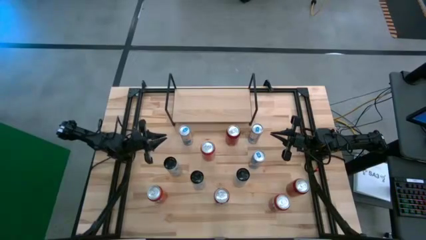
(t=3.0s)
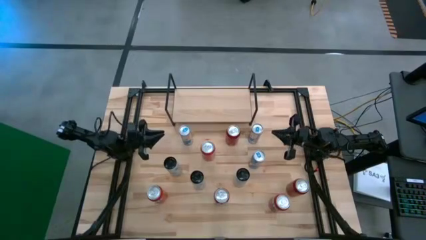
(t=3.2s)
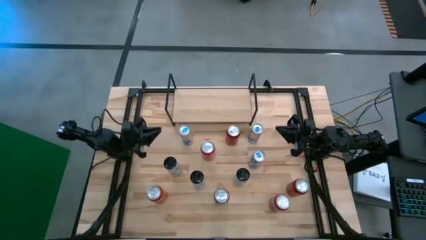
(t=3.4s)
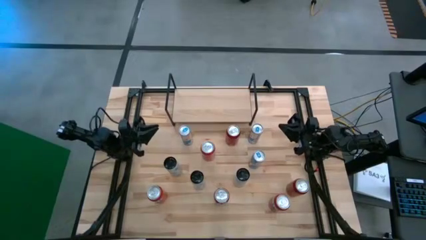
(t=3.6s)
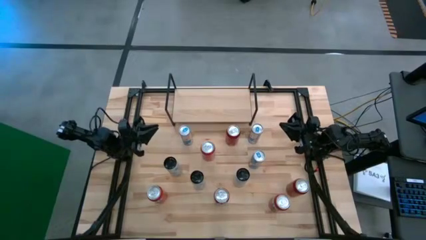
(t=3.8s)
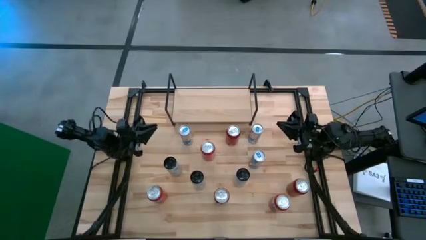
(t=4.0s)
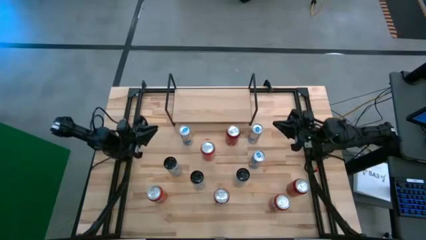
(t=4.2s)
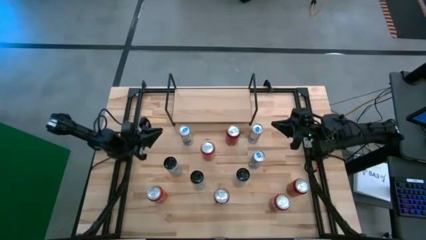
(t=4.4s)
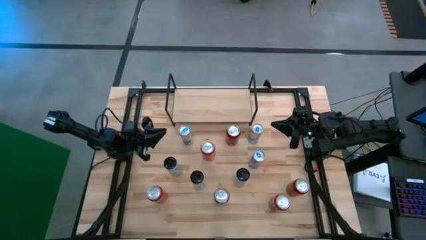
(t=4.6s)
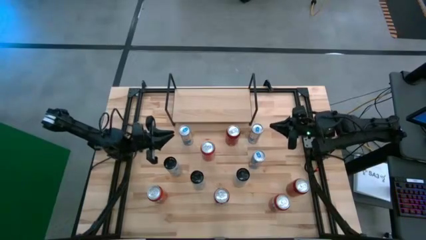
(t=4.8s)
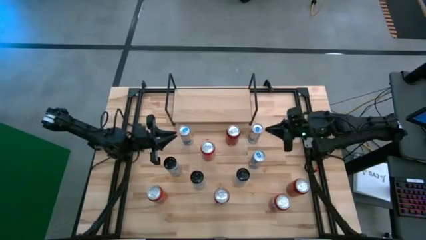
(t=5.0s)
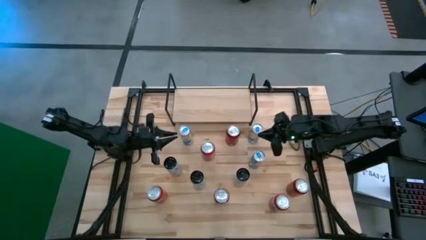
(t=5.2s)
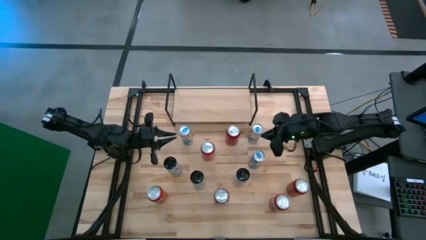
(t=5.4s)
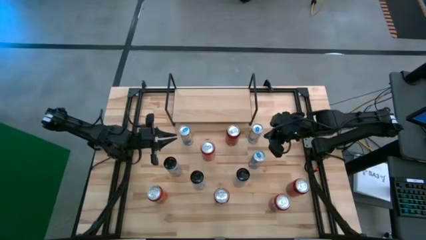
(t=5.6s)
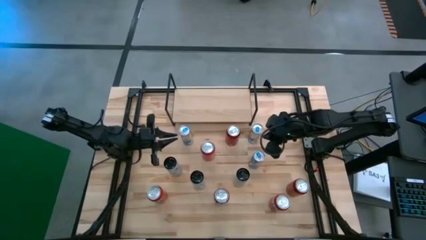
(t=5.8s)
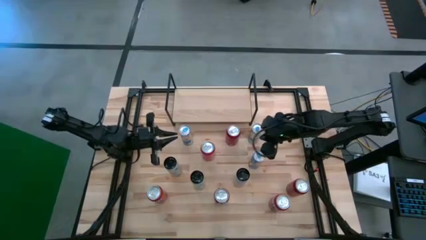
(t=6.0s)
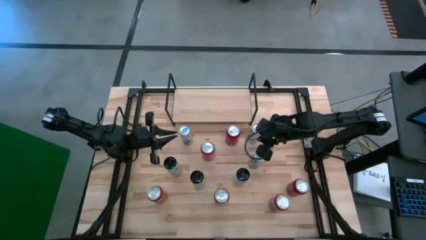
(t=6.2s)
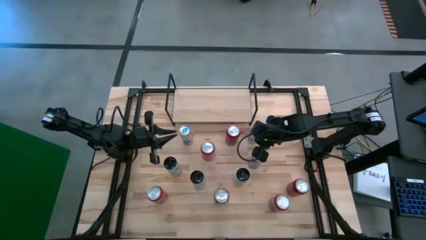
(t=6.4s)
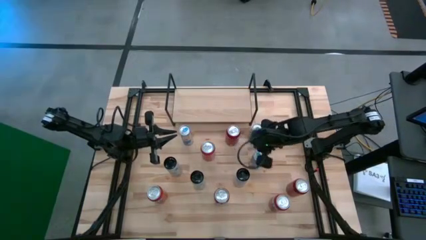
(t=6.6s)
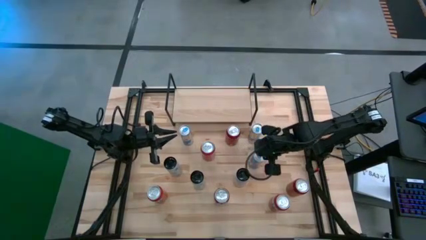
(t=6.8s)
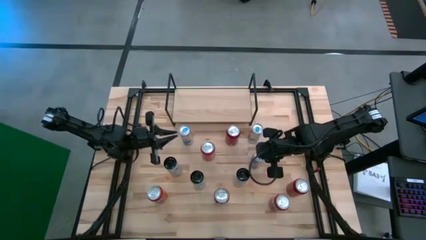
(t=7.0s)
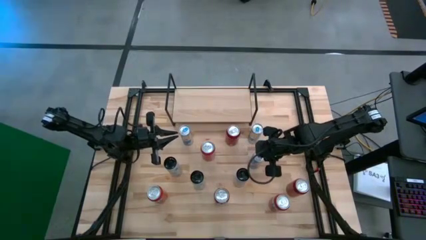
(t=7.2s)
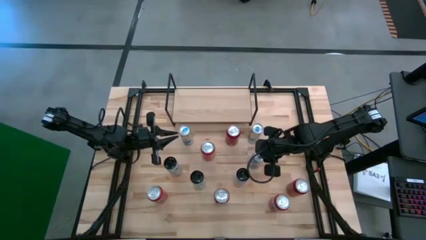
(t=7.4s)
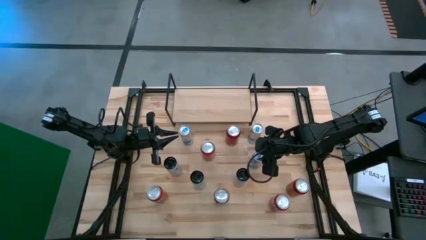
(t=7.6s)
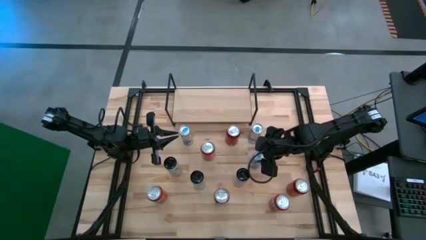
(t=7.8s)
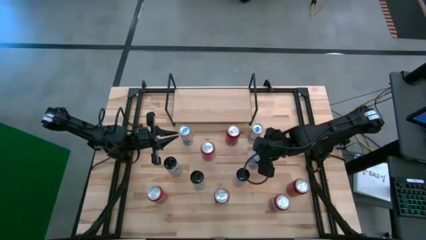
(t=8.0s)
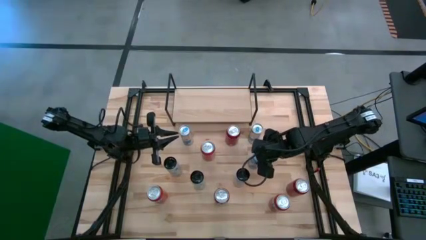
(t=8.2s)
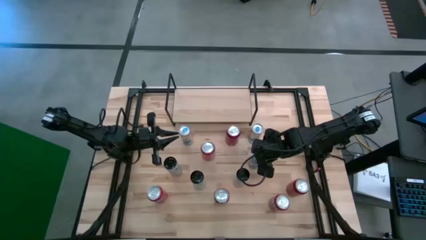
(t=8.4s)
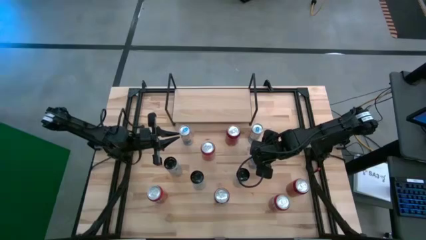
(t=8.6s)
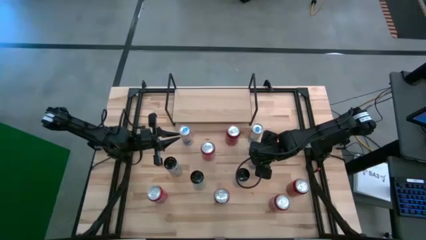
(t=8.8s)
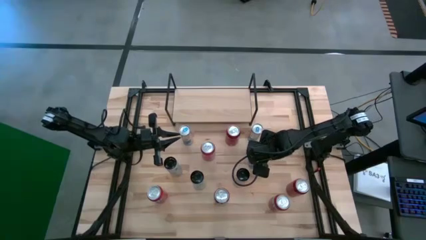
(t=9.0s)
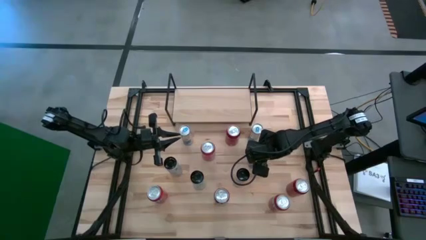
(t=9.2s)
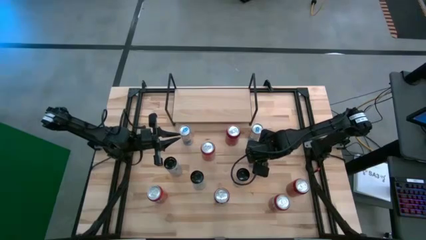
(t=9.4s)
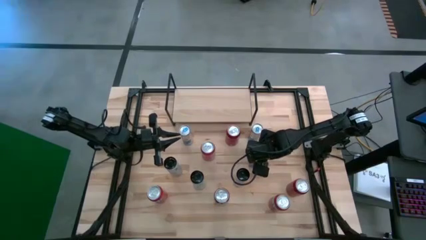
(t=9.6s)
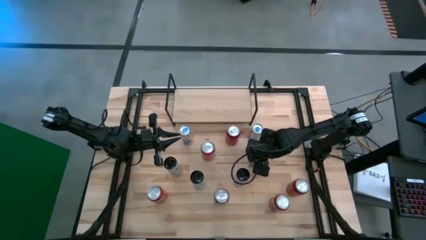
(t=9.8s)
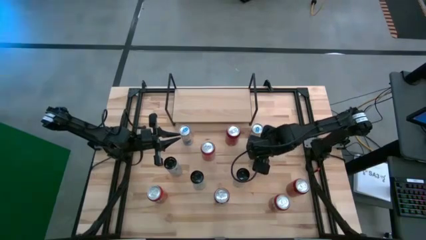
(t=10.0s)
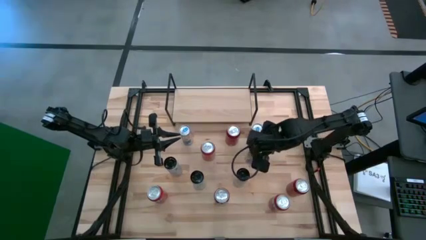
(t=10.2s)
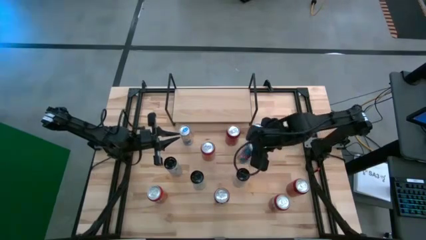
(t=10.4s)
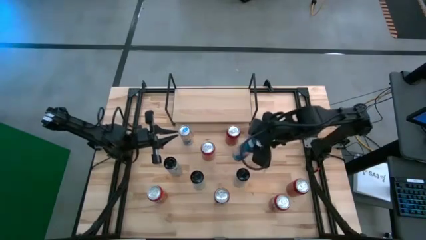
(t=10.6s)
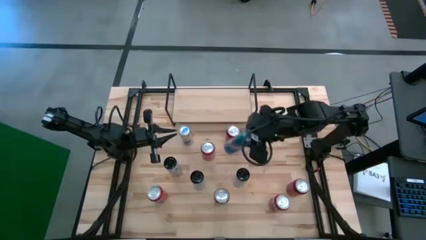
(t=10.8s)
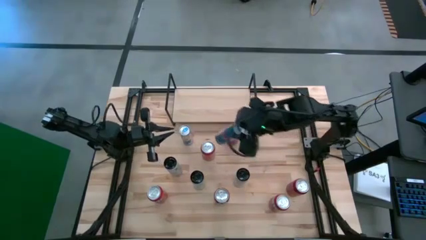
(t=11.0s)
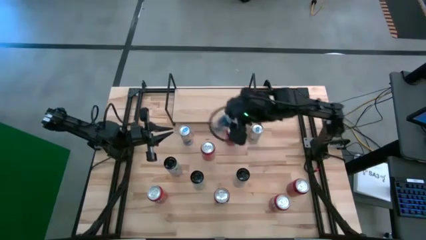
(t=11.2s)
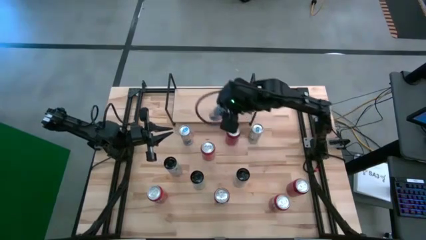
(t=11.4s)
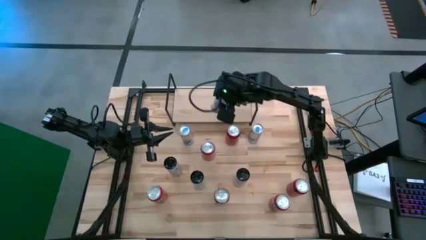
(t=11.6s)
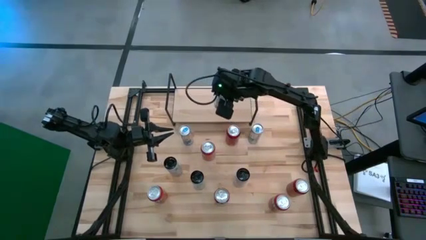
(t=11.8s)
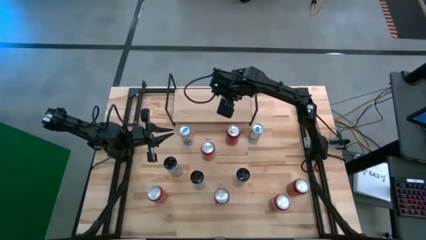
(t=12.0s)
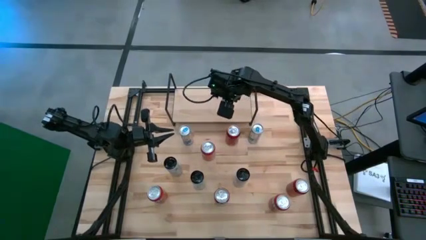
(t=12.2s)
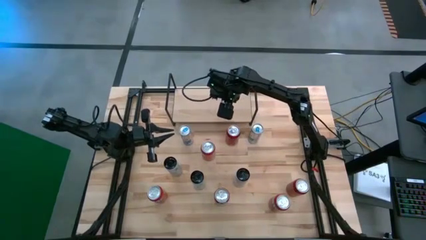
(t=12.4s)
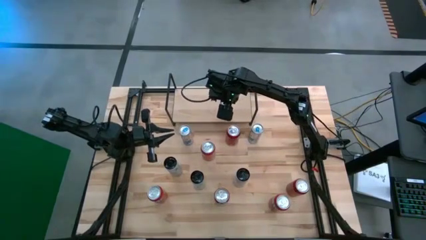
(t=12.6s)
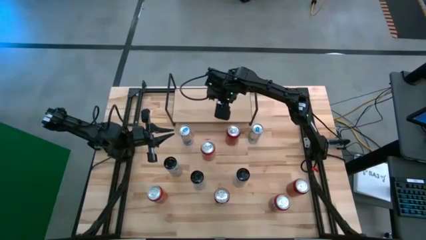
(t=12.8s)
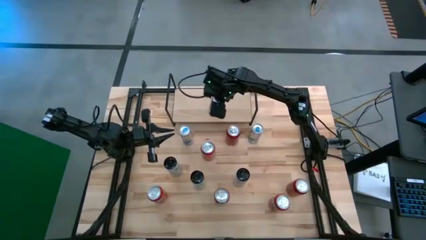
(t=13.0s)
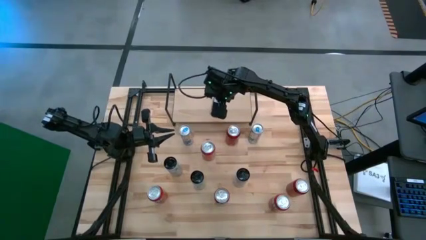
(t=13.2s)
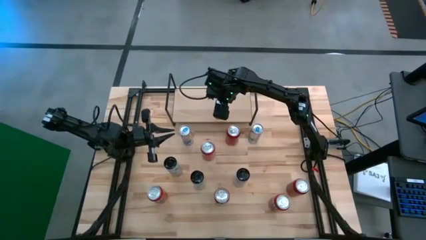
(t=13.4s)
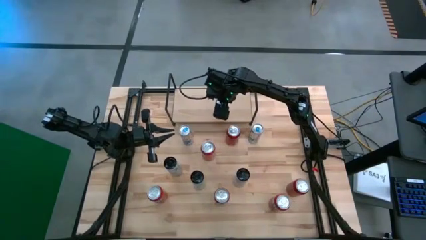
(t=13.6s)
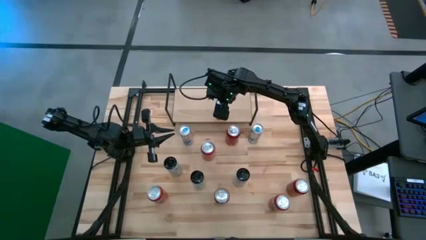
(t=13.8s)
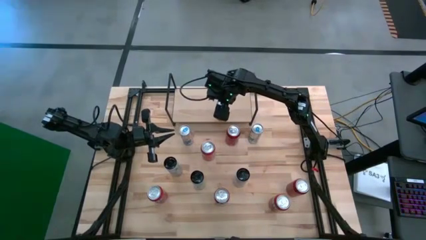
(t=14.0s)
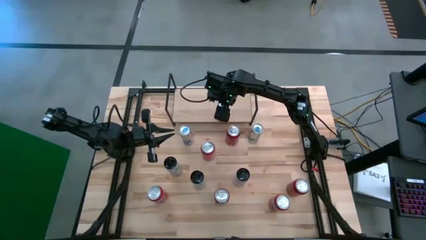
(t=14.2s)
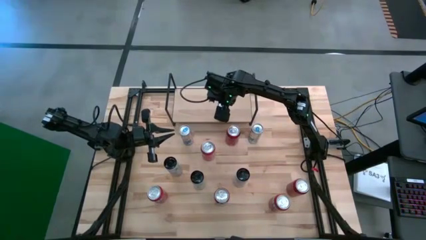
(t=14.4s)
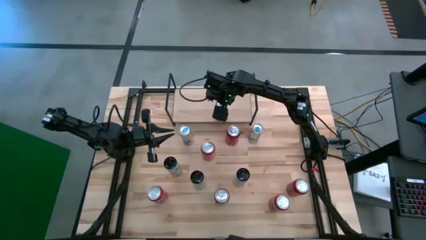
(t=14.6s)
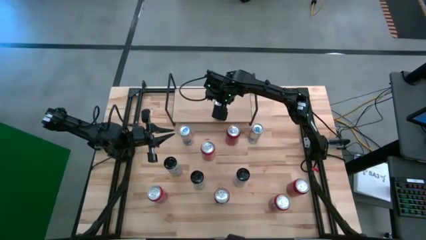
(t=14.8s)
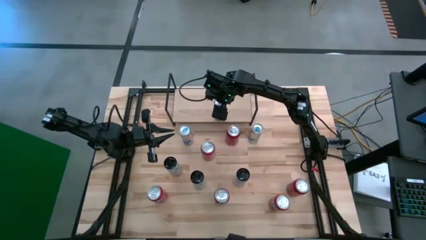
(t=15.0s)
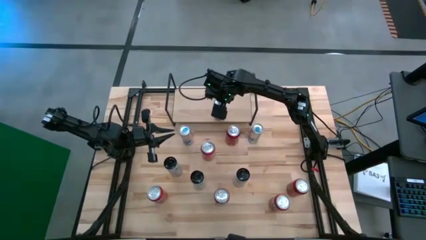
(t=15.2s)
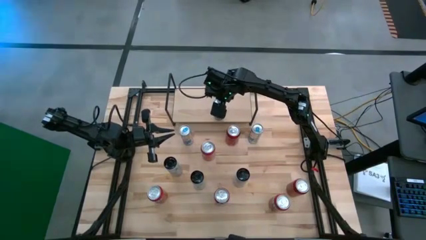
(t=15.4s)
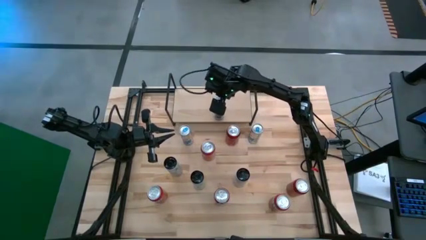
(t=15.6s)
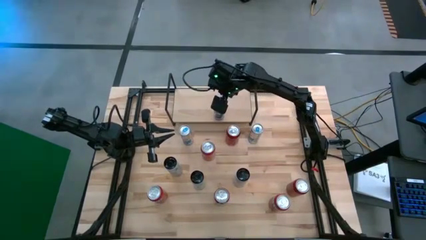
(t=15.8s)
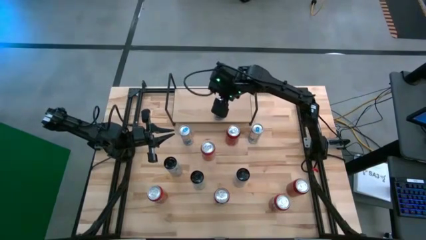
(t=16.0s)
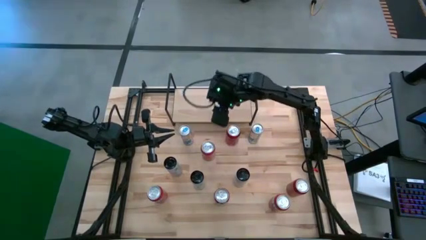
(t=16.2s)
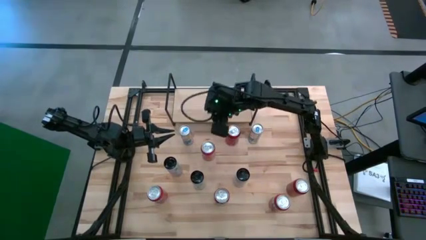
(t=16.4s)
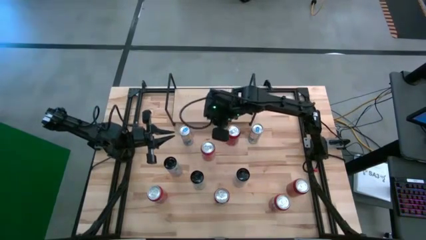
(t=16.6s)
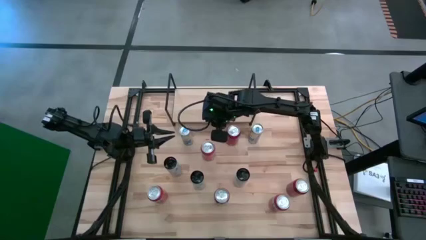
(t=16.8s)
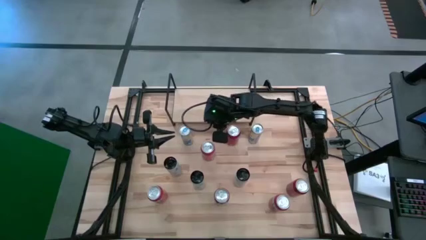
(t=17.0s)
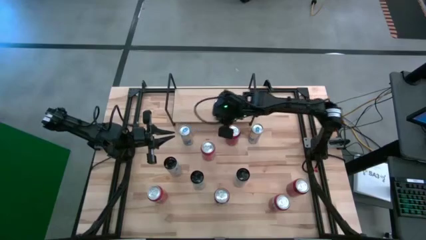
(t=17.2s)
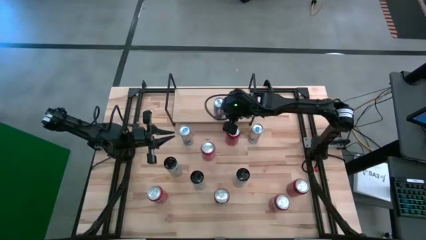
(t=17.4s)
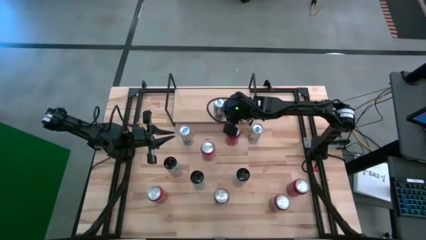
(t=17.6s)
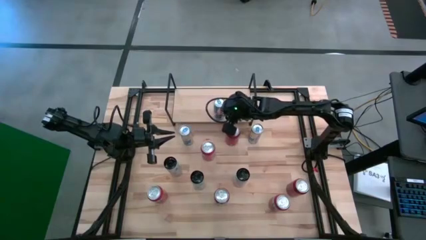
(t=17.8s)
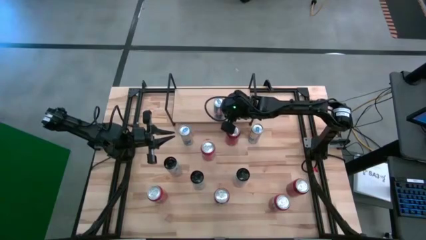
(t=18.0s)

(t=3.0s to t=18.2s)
Task: Place canned beverage on shelf
Put the bottom right blue soda can on the shelf
